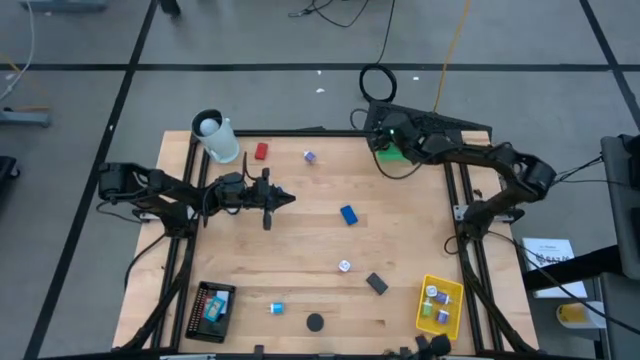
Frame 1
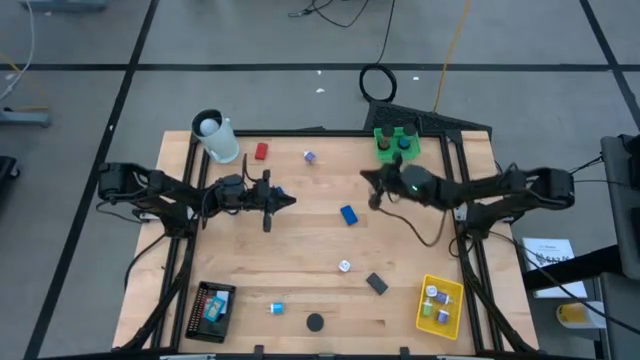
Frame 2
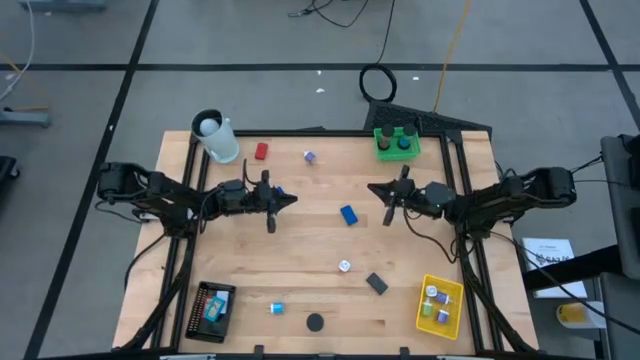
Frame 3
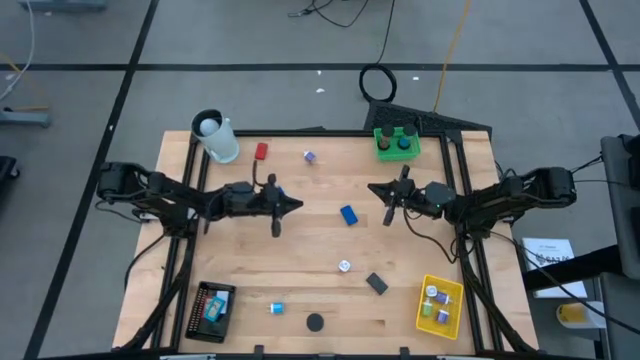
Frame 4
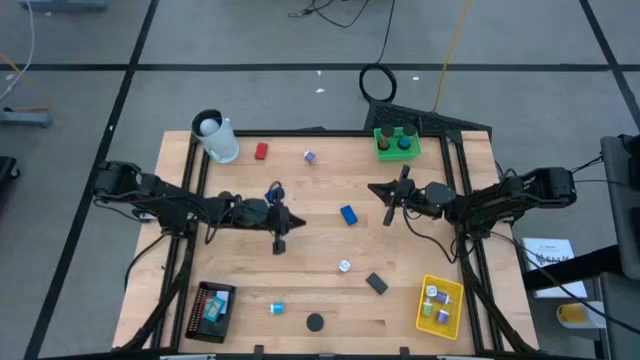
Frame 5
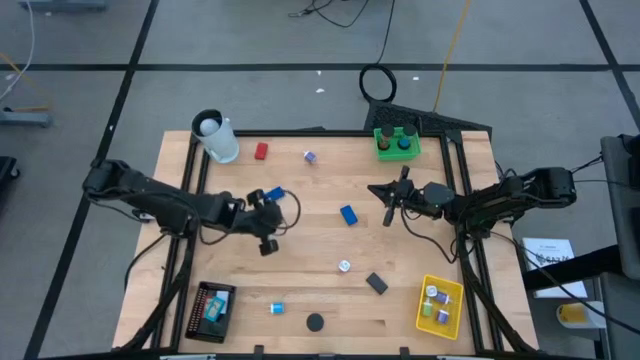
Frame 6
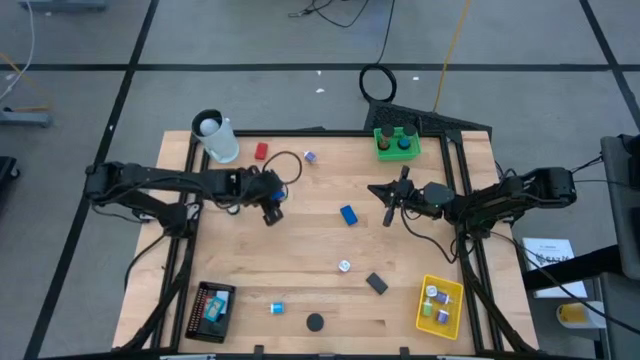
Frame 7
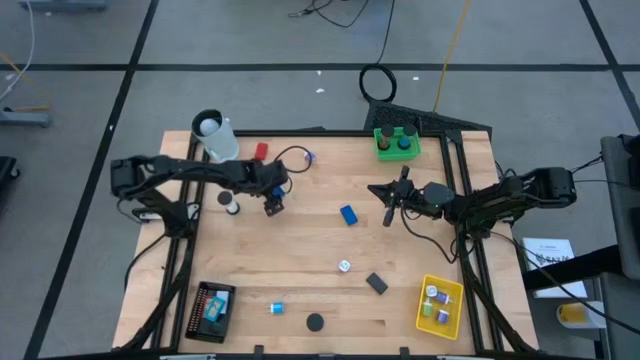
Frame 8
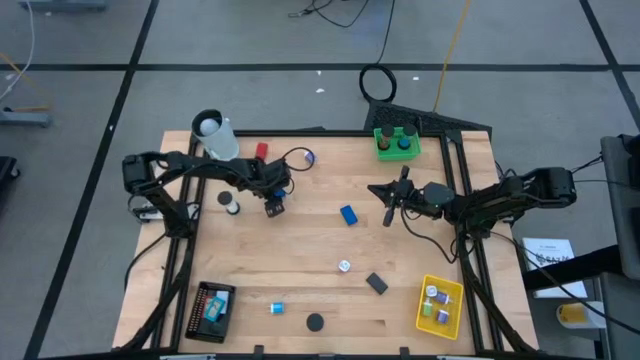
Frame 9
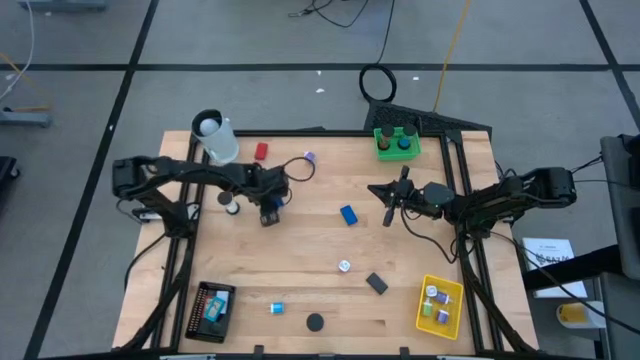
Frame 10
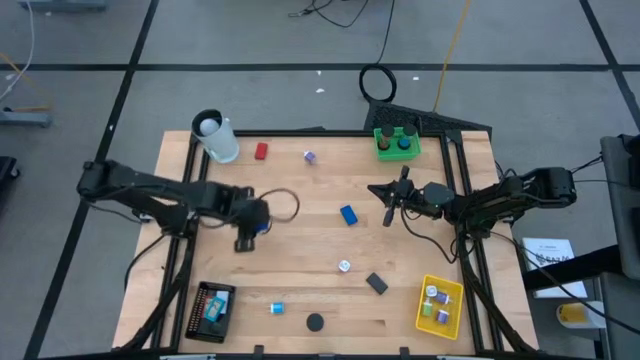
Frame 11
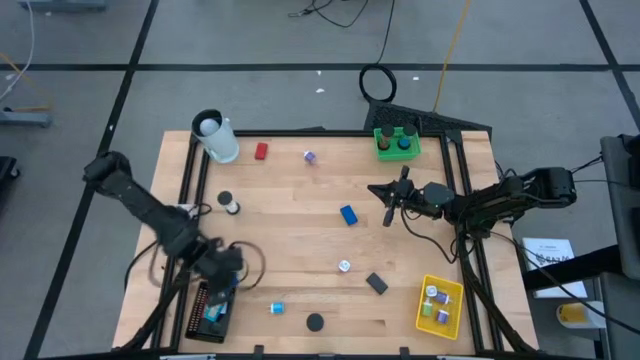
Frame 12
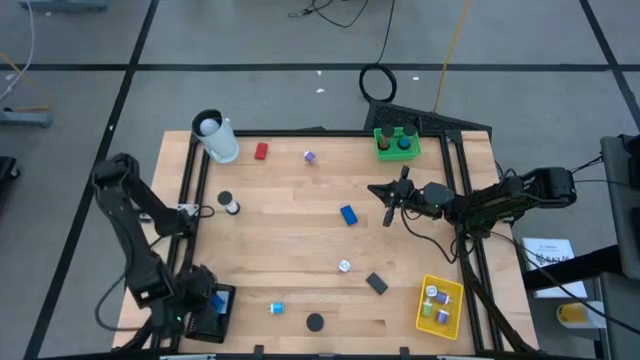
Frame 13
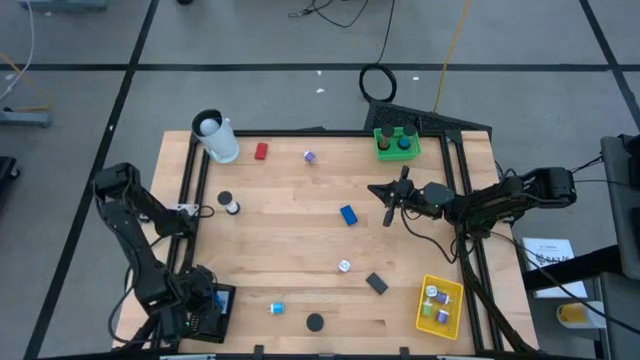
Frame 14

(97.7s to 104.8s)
Task: Pick & Place Office items
Put the top blue digital clock into the black bin

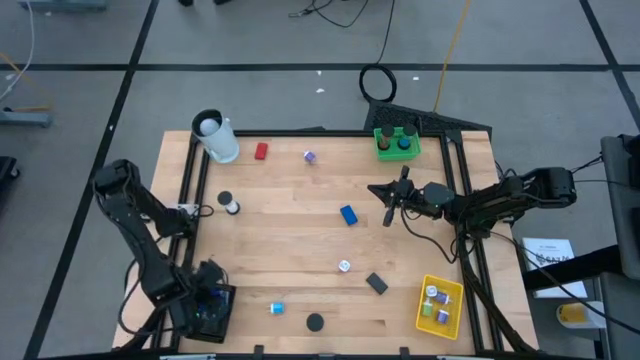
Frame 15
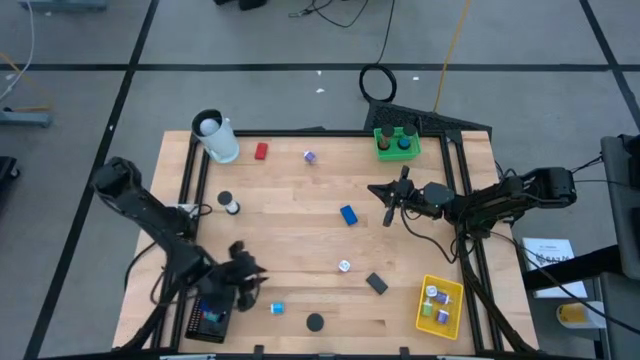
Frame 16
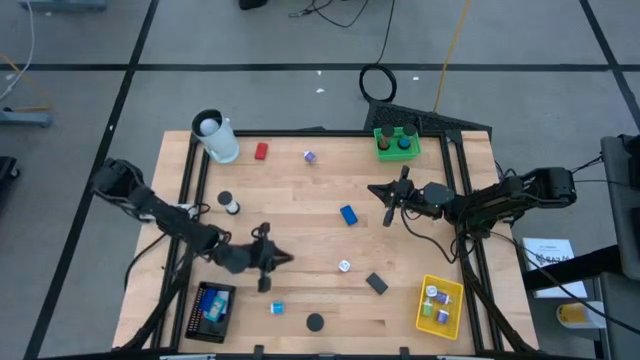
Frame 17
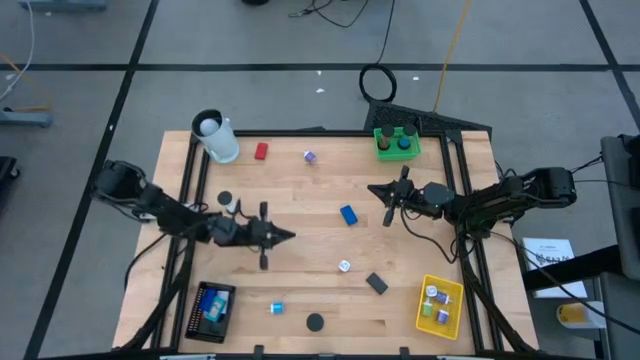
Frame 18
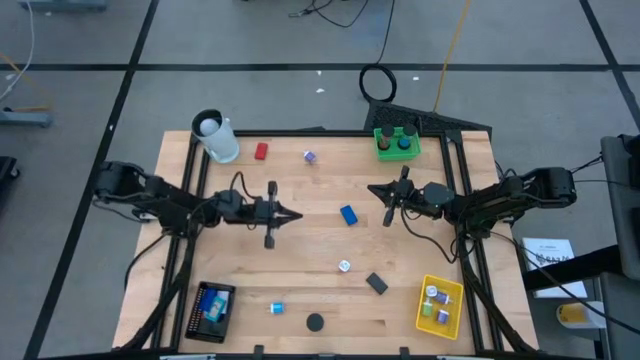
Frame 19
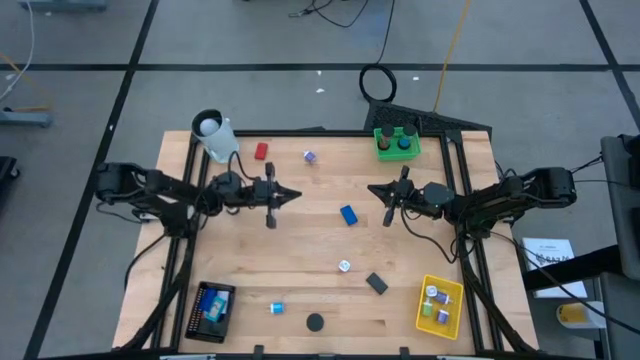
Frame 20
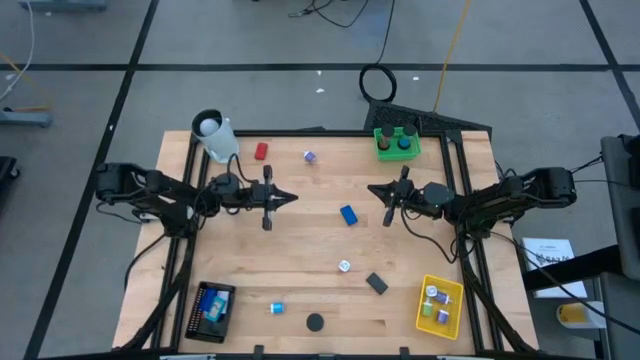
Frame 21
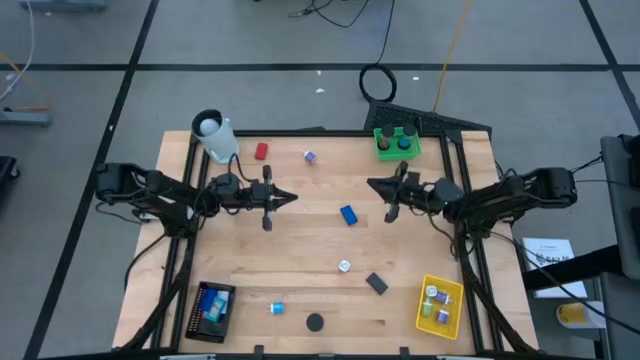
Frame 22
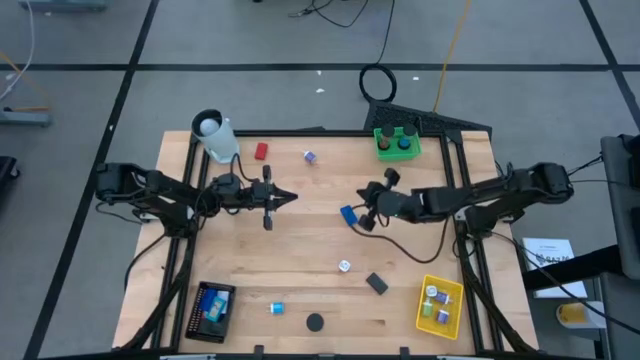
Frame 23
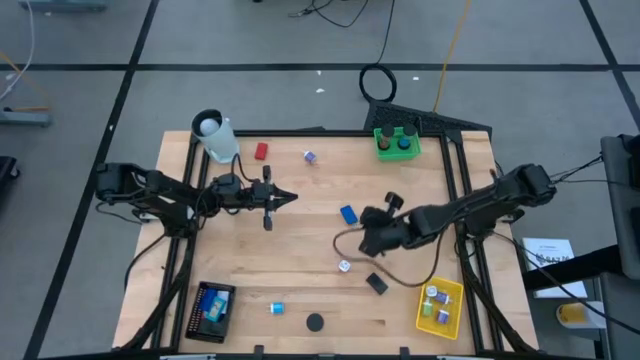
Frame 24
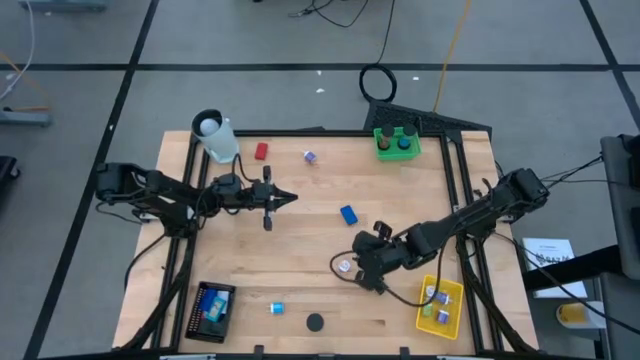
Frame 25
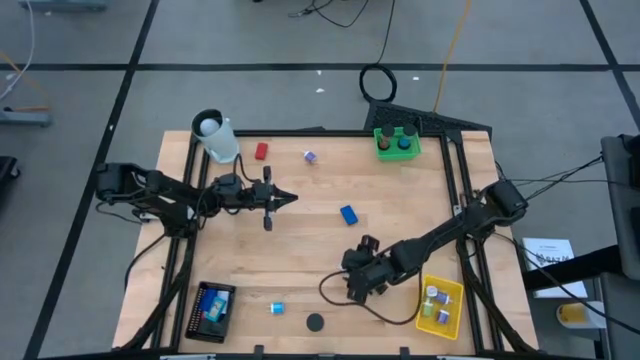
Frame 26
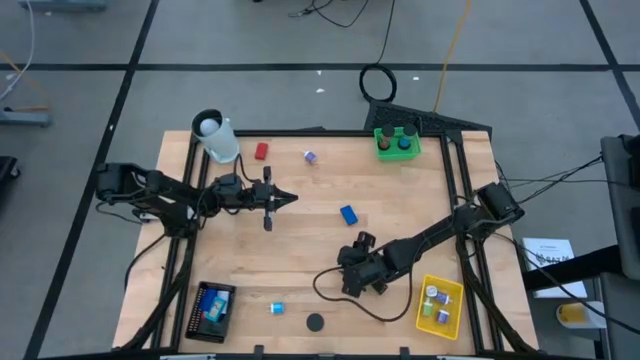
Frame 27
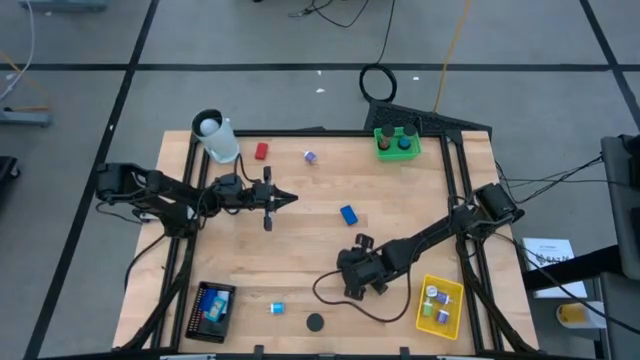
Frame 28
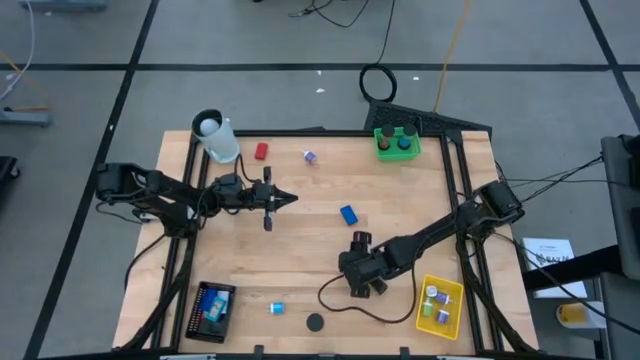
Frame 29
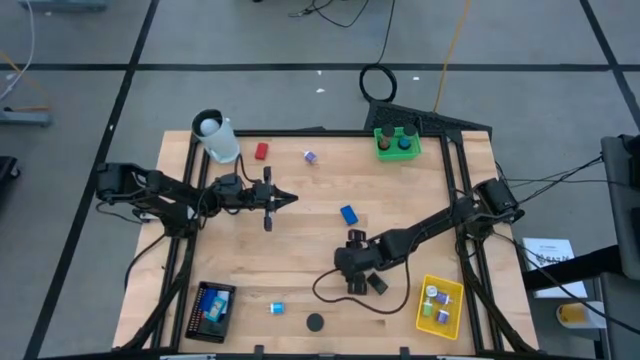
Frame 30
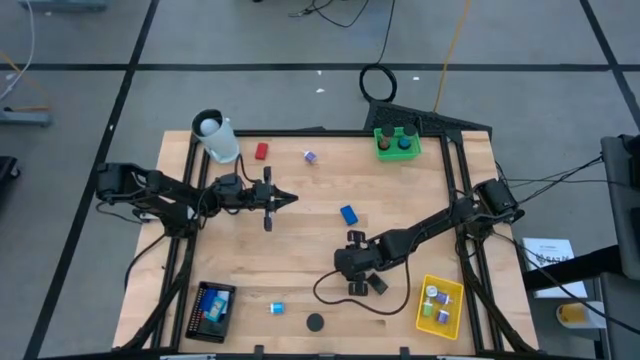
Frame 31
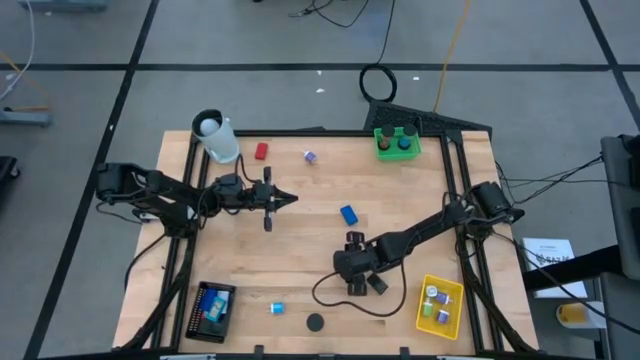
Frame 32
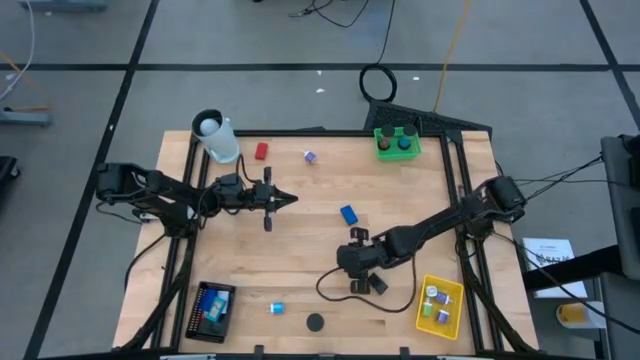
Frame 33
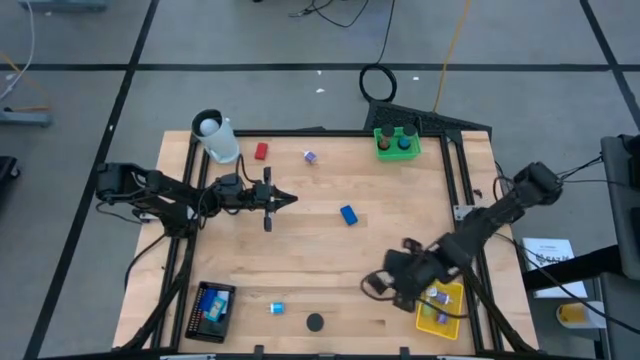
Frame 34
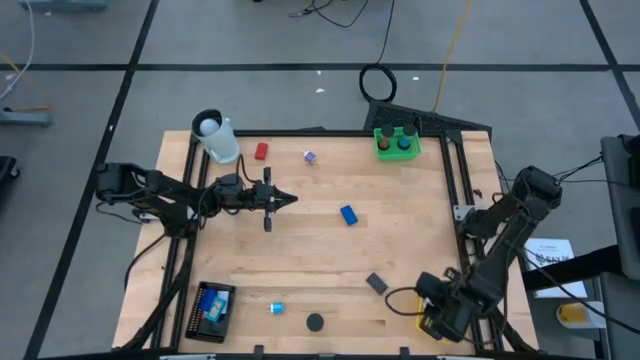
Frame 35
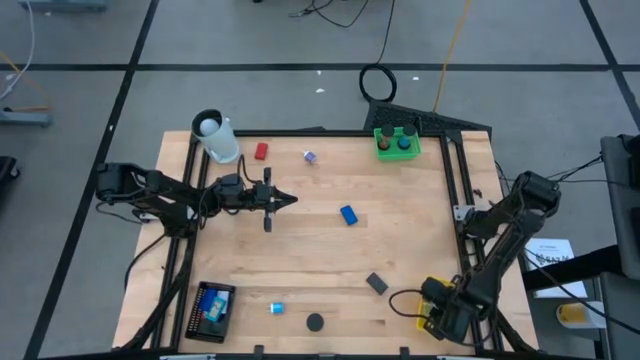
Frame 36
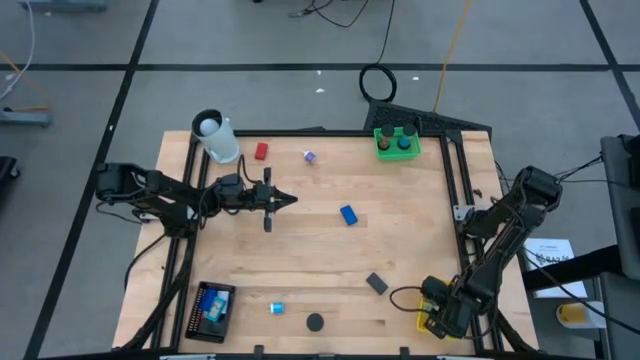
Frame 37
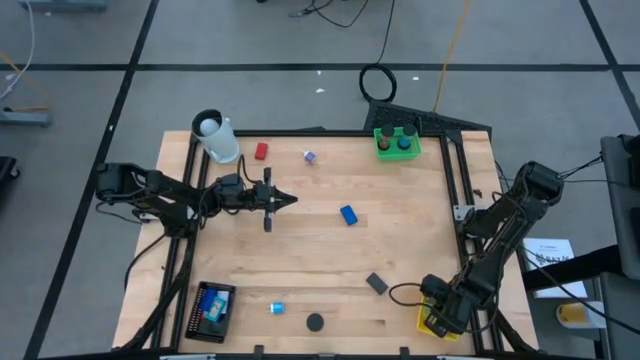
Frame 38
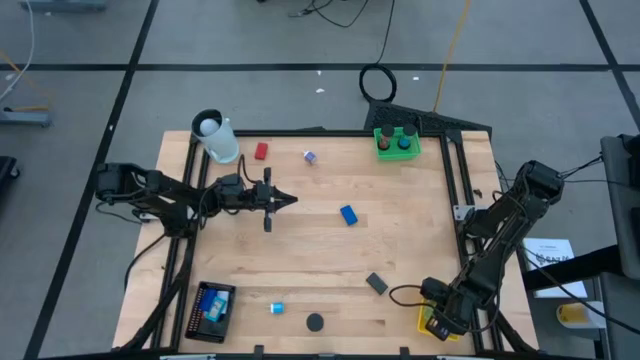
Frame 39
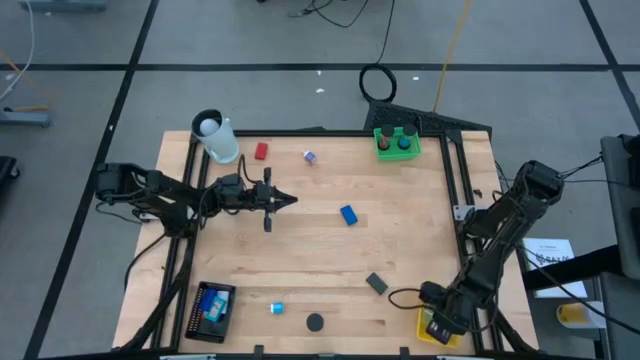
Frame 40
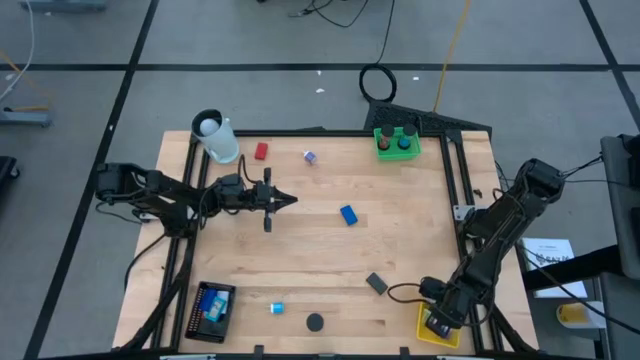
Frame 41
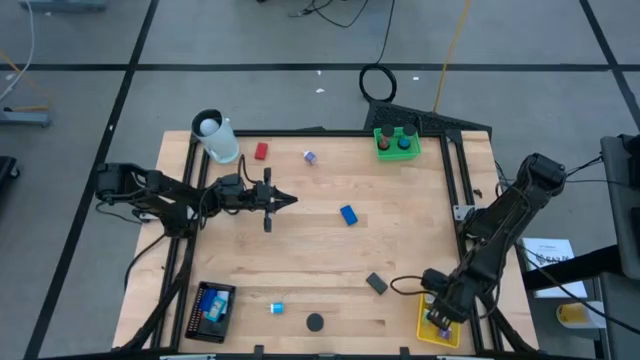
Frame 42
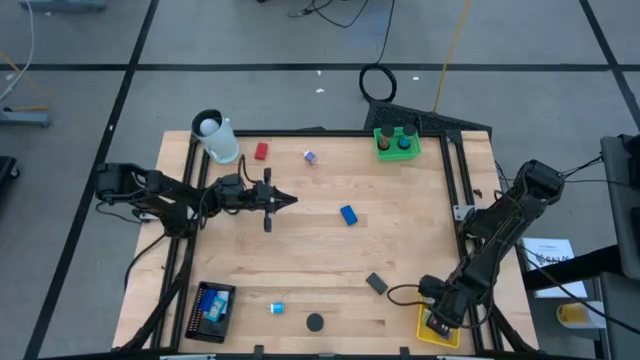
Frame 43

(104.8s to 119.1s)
Put the pink charger adapter into the yellow bin
